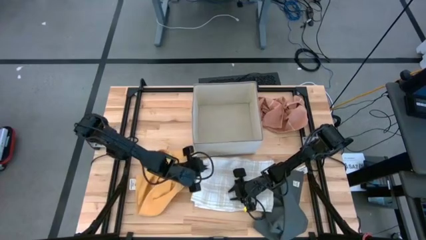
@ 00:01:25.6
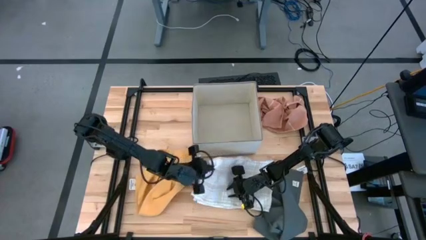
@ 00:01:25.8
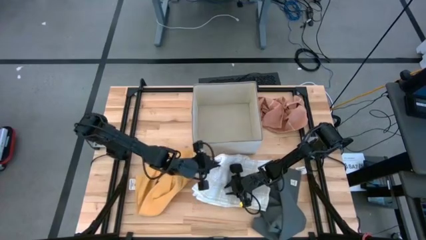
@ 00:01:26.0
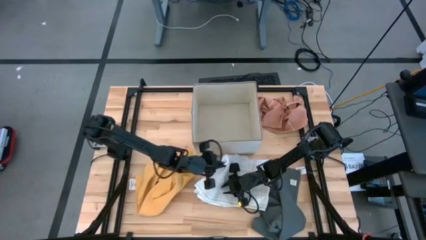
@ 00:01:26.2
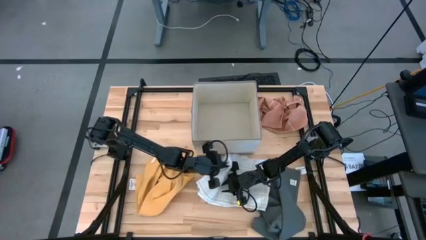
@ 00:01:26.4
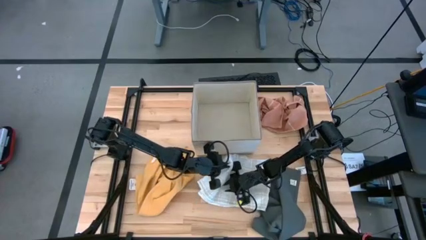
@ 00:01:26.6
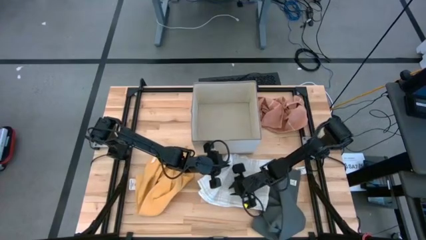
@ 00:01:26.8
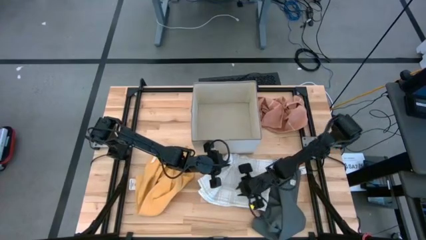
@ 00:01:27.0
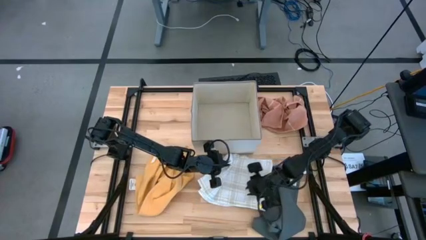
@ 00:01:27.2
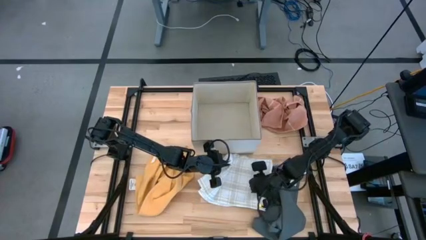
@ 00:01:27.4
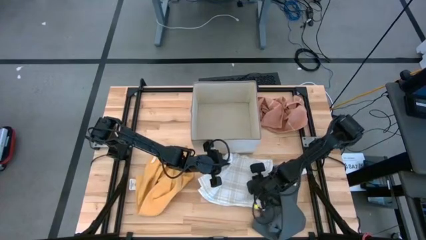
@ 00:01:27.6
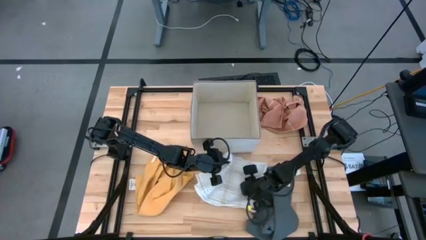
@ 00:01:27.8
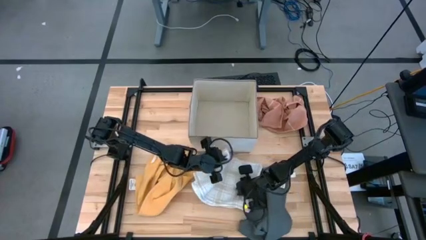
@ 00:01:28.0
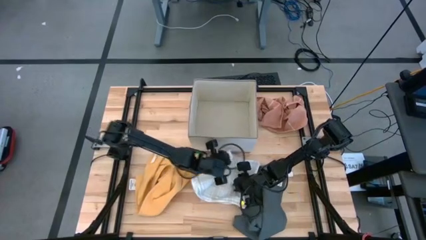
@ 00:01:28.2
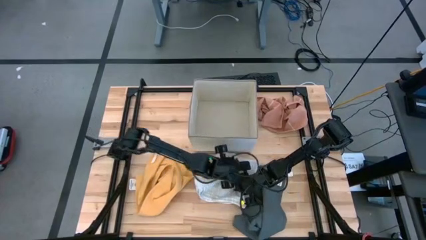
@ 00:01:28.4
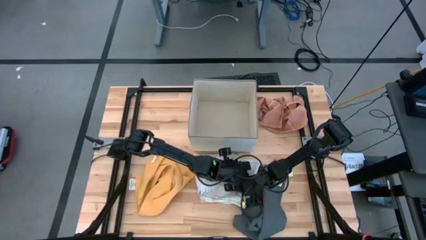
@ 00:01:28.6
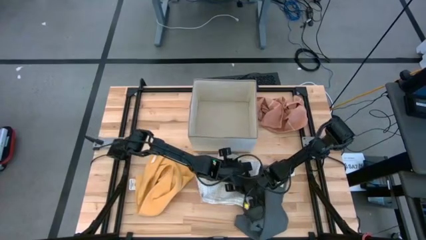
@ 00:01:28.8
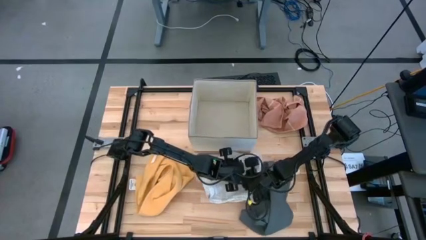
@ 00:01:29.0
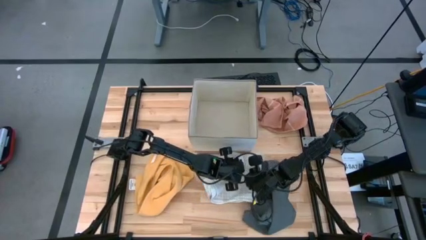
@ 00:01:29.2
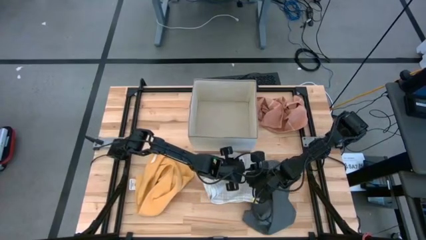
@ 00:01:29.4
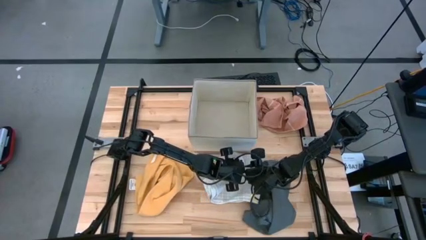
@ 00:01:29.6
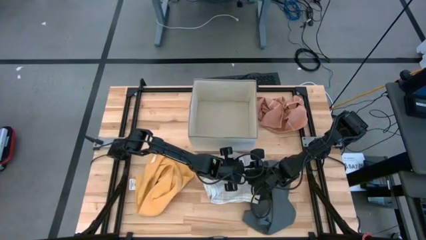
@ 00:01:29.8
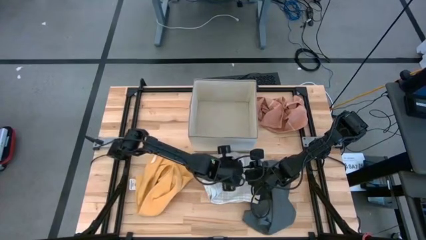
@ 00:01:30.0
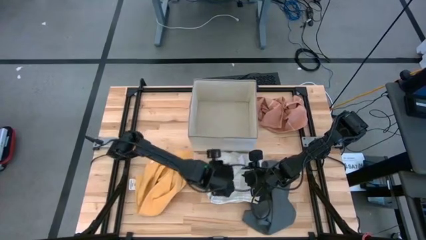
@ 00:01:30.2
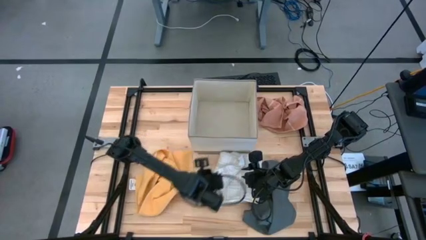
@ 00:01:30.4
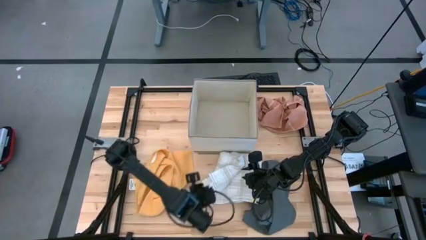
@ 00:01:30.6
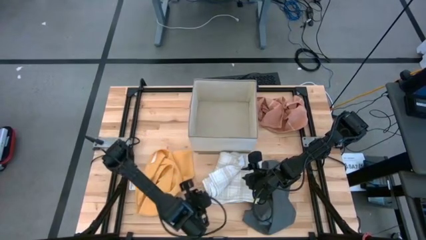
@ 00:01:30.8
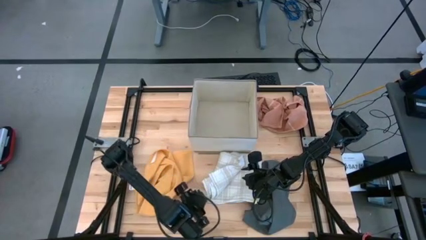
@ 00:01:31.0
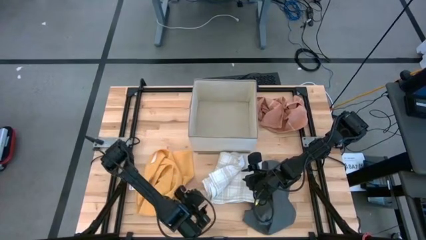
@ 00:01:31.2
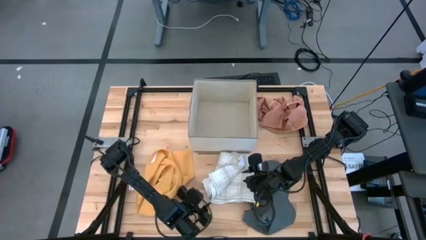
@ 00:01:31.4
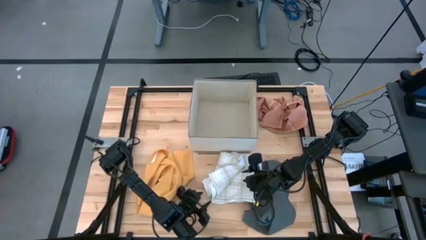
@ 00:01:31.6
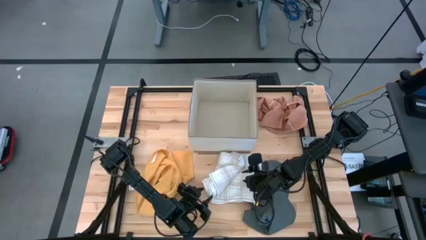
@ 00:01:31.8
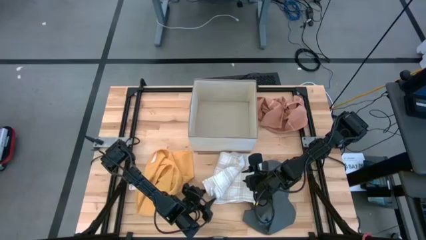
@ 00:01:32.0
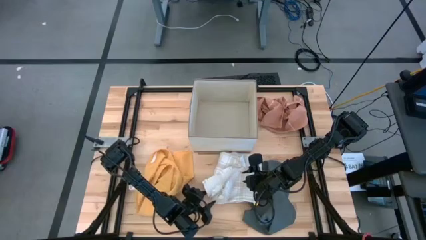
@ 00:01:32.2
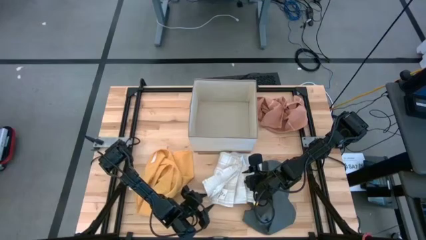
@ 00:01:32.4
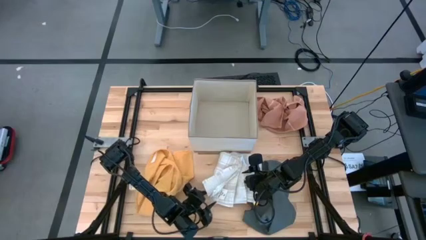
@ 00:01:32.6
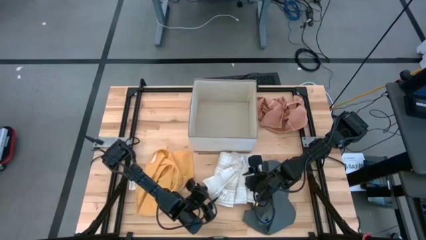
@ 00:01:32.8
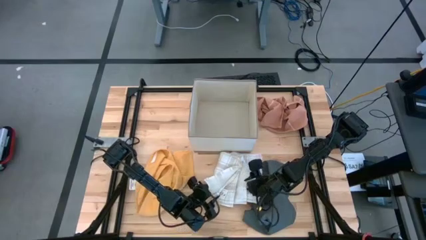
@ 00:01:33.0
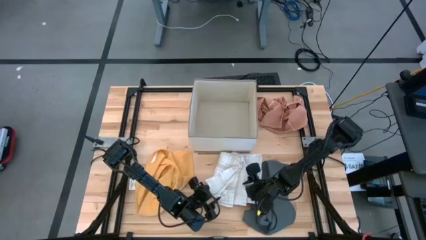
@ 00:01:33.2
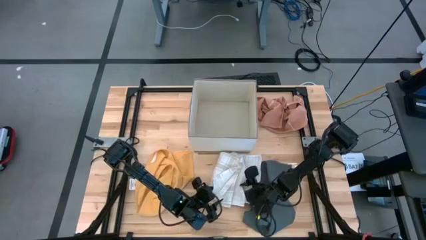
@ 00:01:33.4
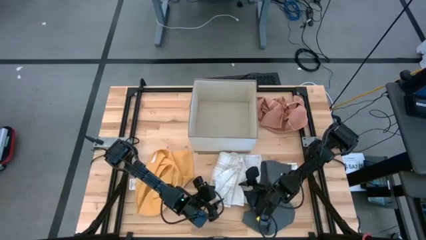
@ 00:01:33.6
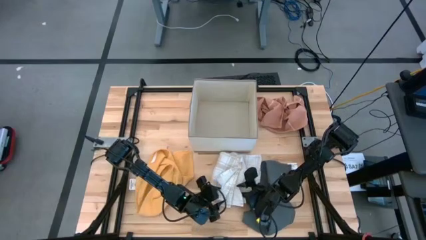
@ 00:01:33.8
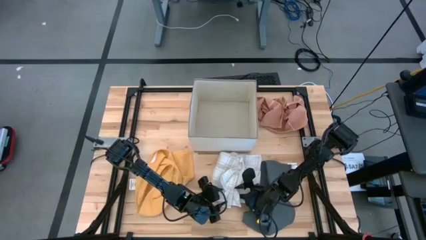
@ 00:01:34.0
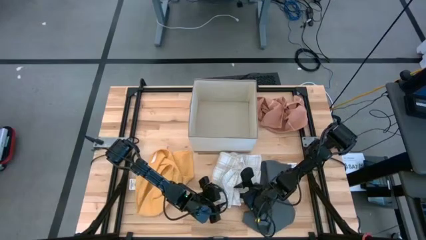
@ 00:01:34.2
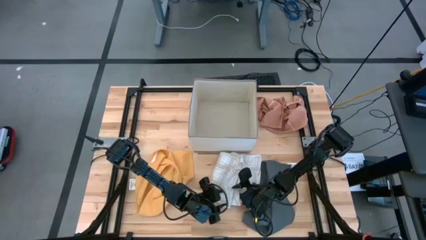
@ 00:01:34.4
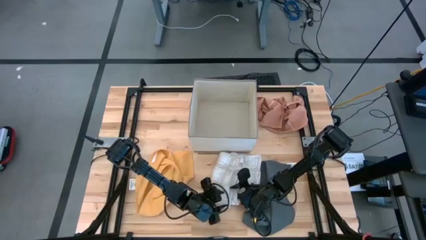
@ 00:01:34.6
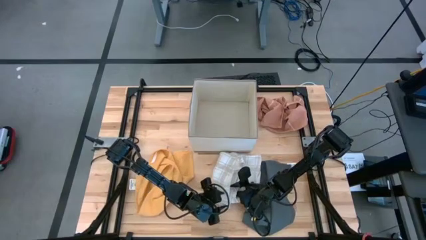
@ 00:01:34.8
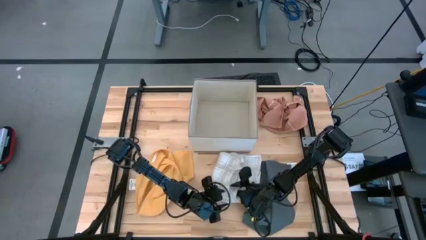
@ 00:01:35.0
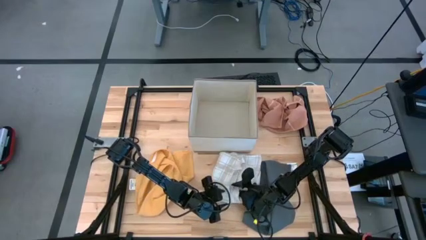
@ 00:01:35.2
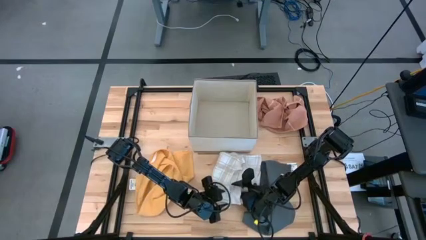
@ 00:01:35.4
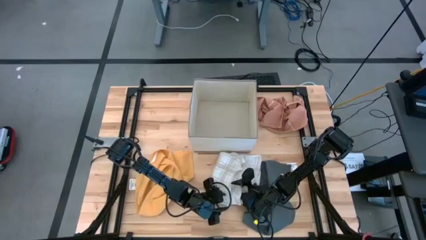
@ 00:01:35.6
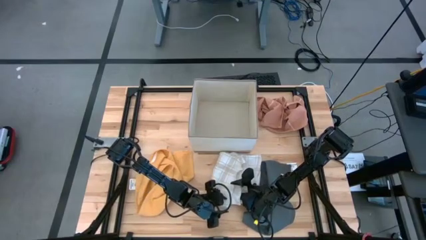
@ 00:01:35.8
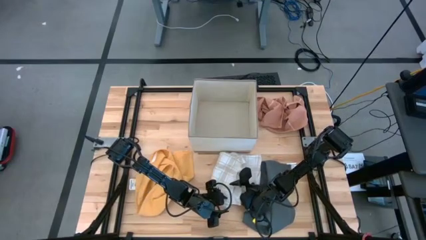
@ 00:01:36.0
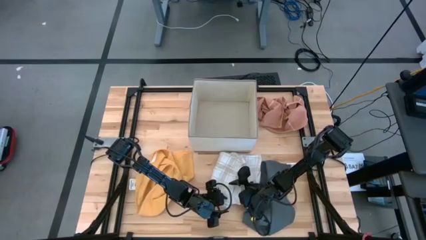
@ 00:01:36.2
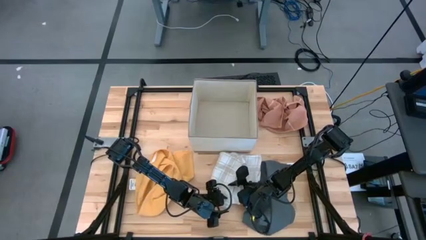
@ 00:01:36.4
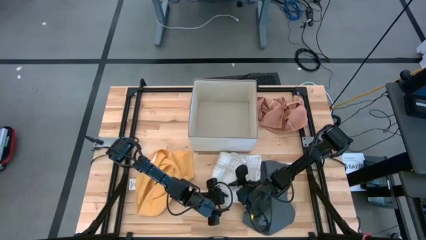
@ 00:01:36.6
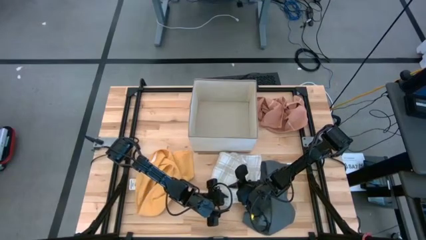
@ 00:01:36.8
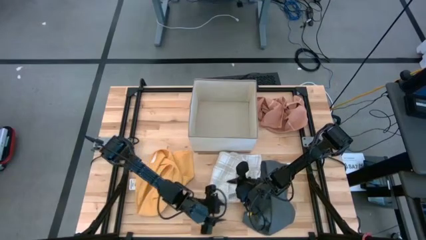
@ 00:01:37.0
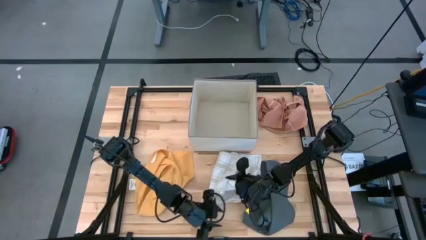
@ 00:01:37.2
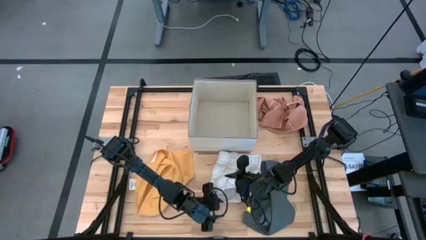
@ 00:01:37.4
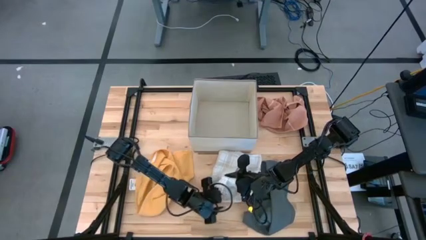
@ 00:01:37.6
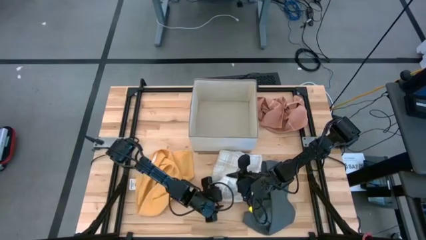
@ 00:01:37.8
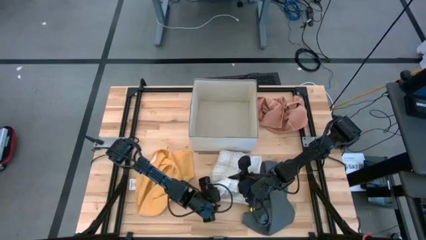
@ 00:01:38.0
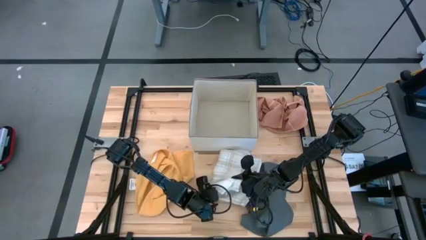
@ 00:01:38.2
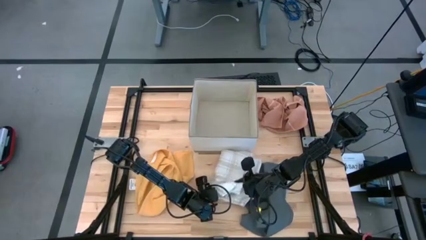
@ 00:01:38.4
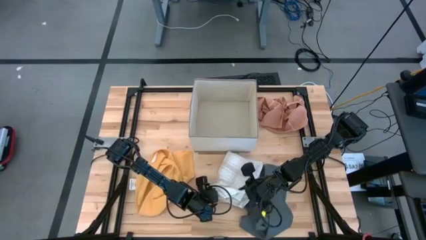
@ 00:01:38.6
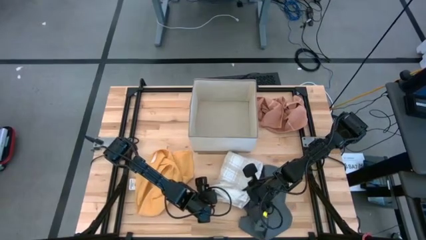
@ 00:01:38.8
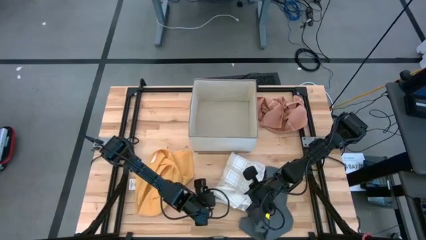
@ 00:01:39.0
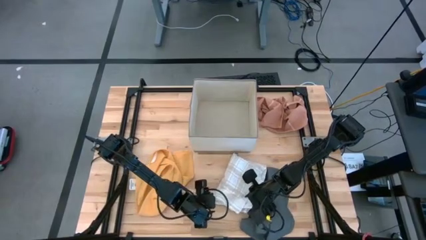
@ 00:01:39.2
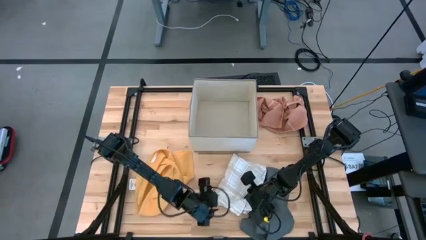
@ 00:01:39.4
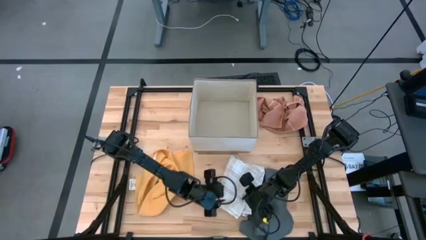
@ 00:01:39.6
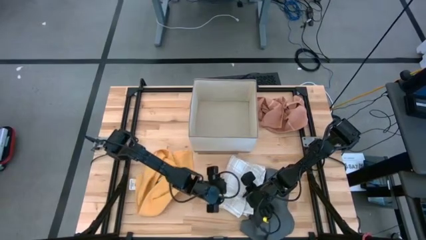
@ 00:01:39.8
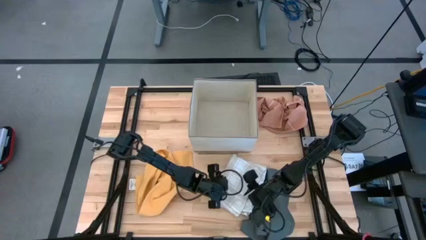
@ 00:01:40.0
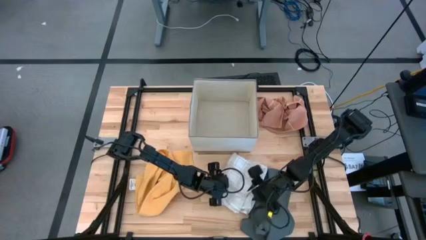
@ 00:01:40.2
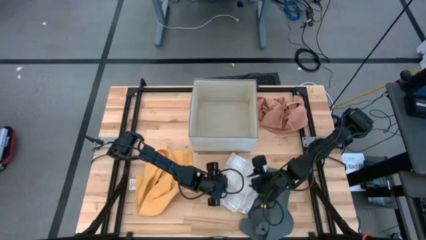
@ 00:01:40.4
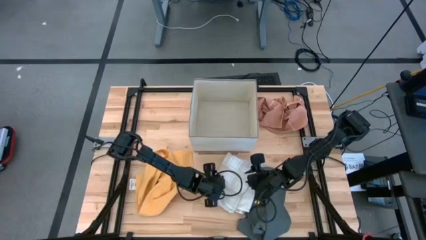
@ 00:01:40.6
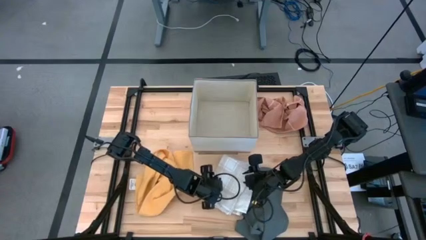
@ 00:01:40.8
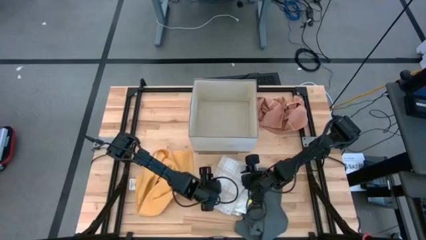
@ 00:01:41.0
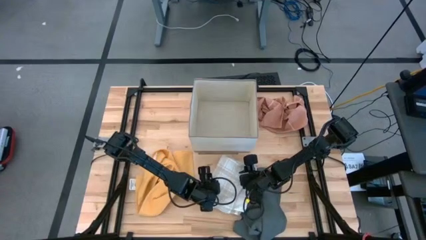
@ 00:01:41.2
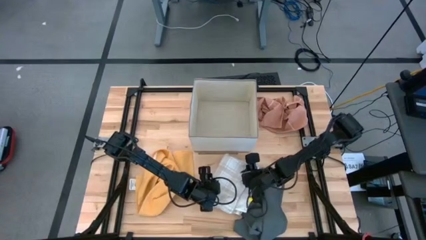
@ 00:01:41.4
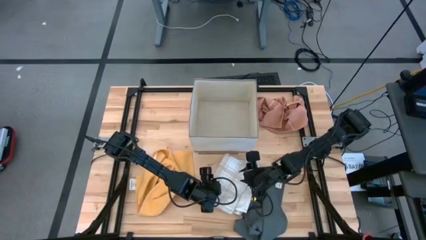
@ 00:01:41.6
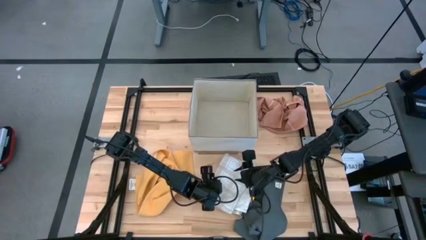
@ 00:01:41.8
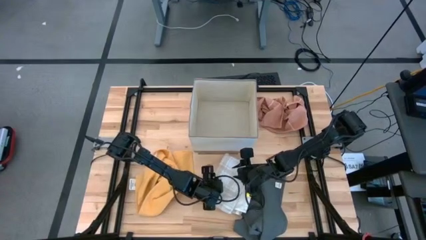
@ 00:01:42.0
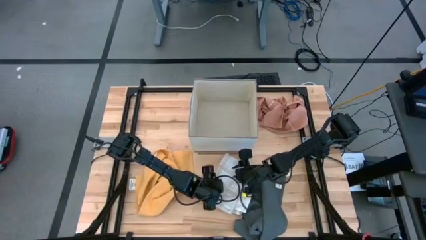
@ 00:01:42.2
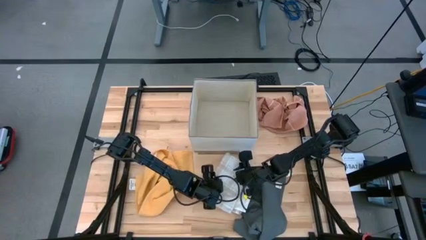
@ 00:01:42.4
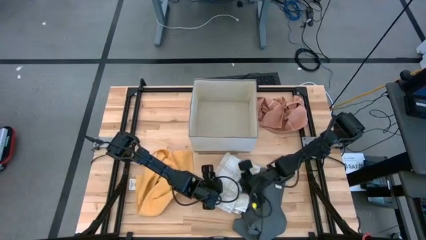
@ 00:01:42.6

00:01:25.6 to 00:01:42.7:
Task: Fold towel
Fold the white towel with brown checkered lines
